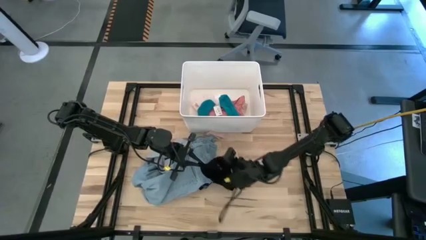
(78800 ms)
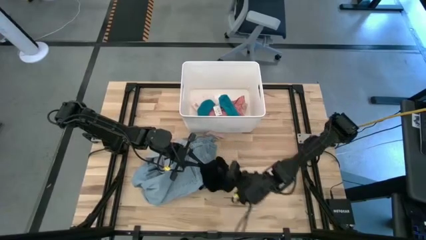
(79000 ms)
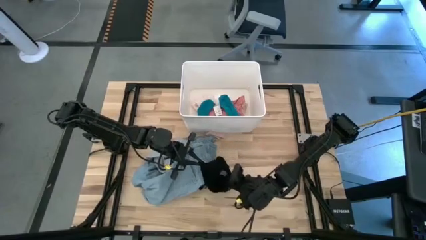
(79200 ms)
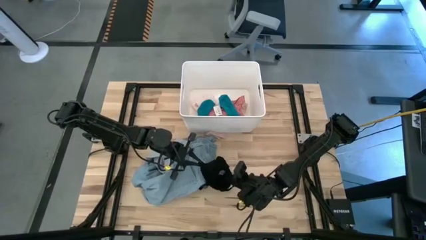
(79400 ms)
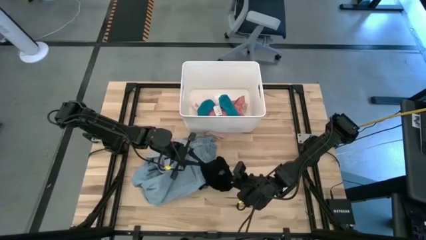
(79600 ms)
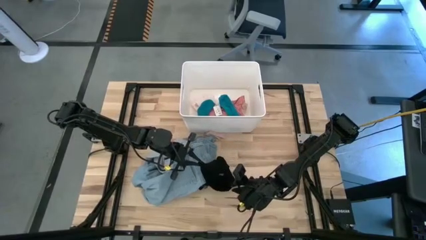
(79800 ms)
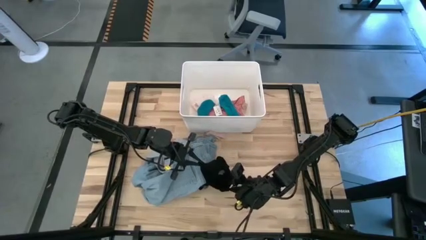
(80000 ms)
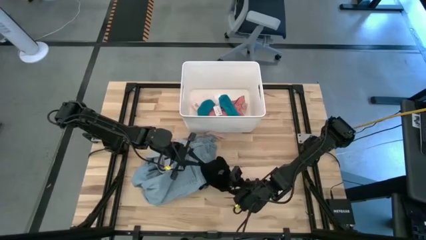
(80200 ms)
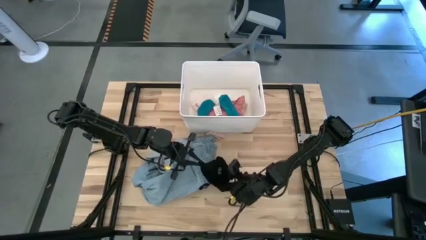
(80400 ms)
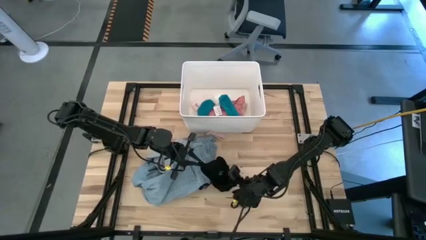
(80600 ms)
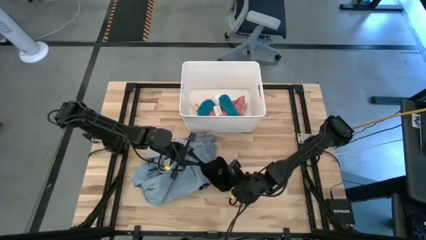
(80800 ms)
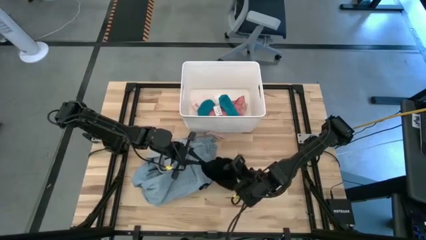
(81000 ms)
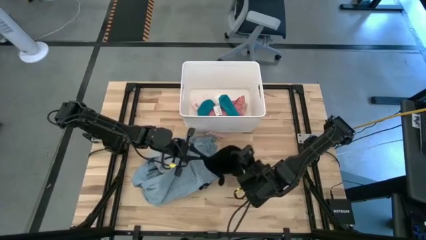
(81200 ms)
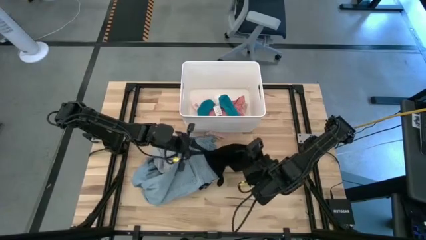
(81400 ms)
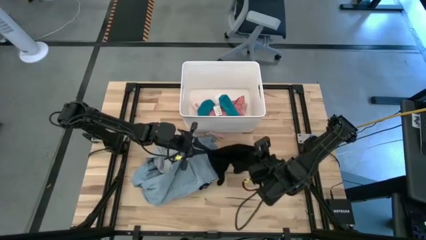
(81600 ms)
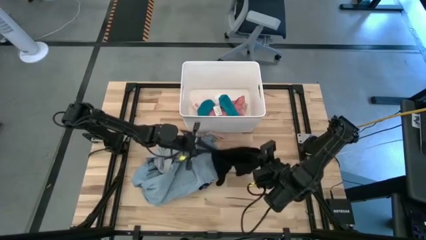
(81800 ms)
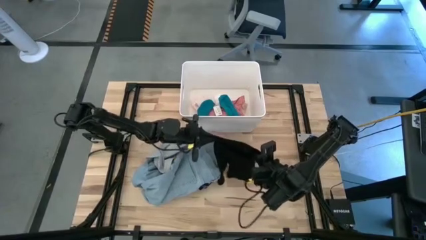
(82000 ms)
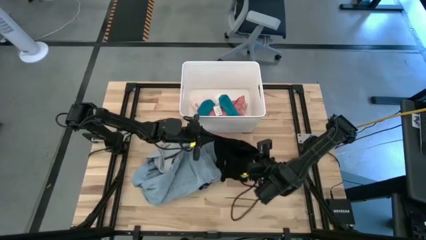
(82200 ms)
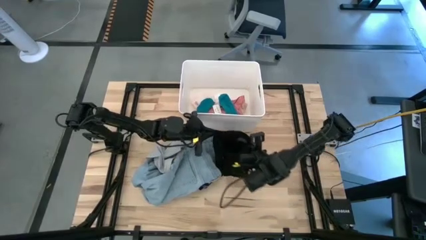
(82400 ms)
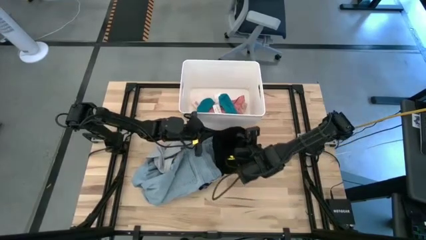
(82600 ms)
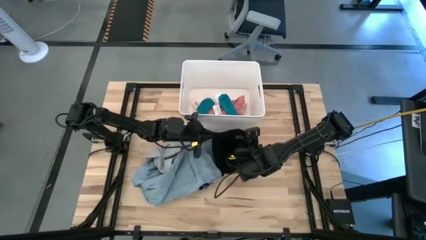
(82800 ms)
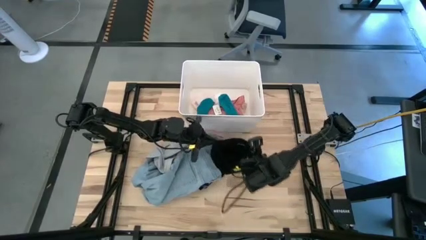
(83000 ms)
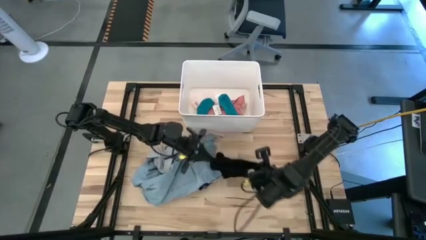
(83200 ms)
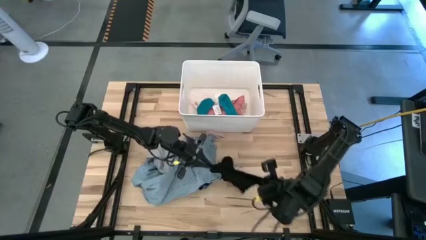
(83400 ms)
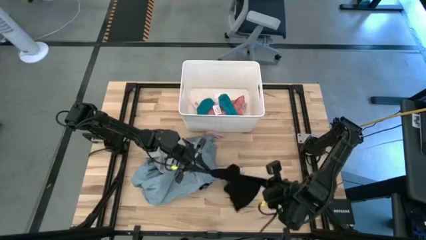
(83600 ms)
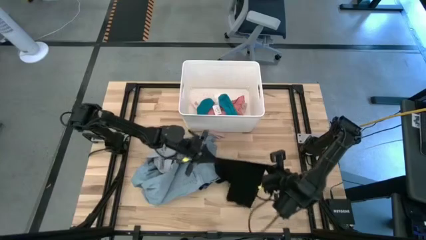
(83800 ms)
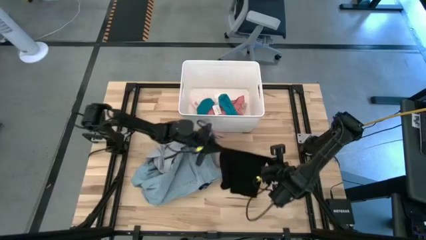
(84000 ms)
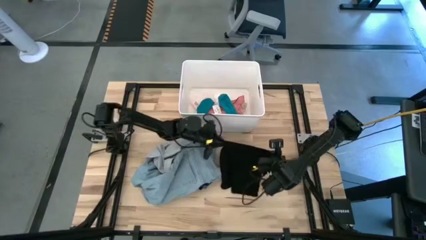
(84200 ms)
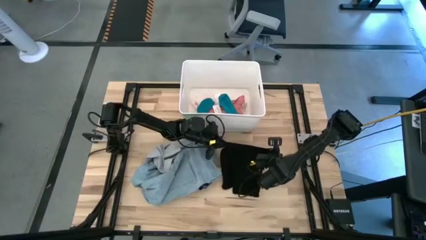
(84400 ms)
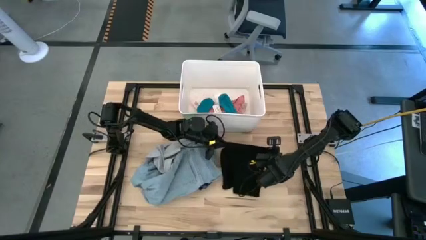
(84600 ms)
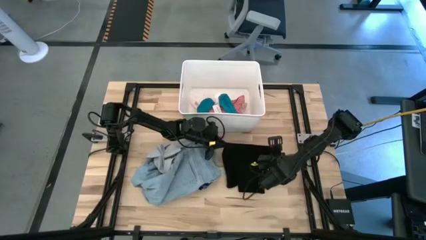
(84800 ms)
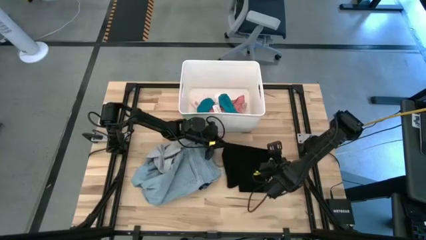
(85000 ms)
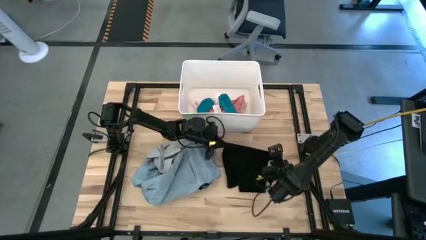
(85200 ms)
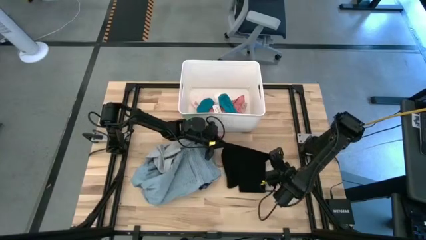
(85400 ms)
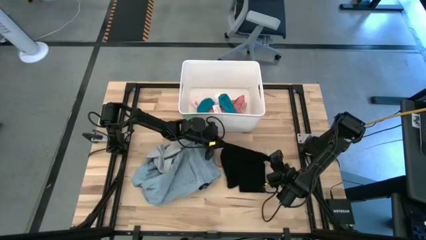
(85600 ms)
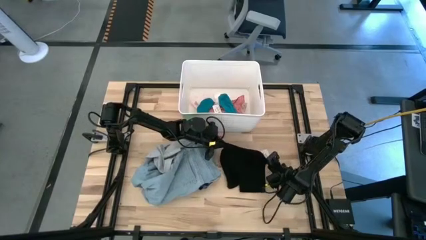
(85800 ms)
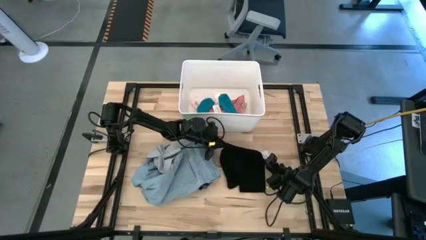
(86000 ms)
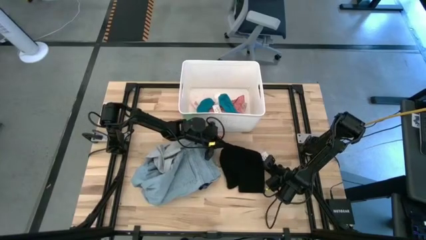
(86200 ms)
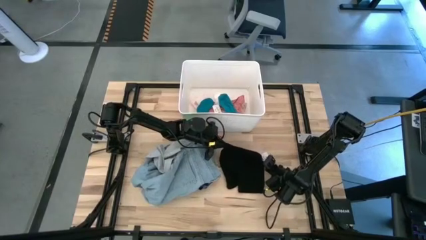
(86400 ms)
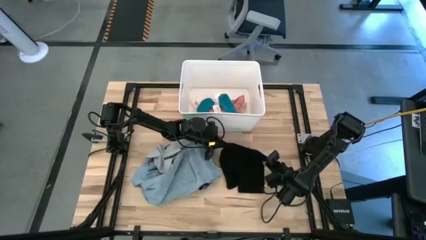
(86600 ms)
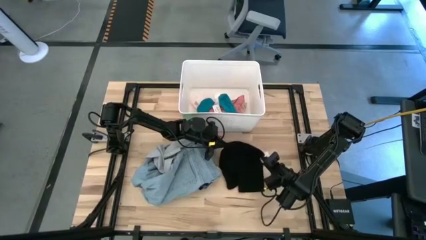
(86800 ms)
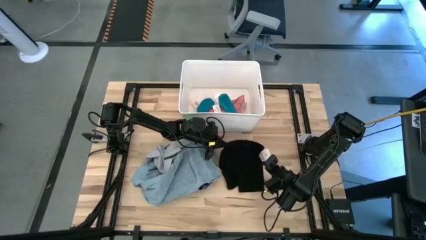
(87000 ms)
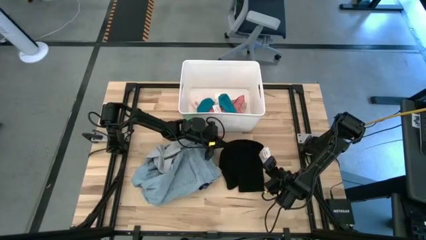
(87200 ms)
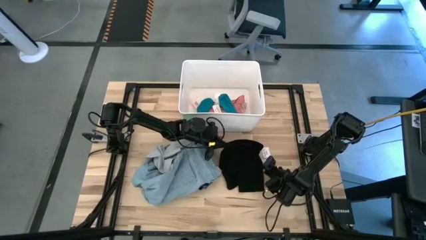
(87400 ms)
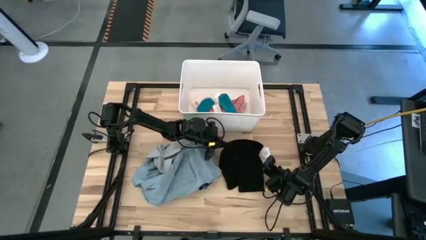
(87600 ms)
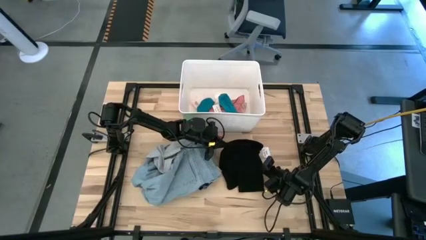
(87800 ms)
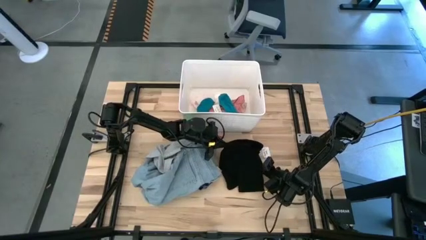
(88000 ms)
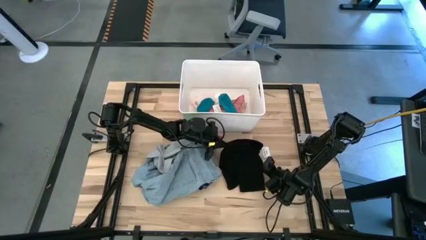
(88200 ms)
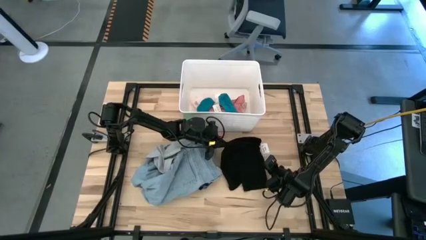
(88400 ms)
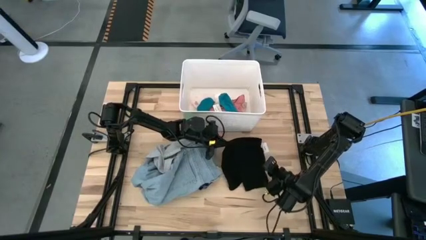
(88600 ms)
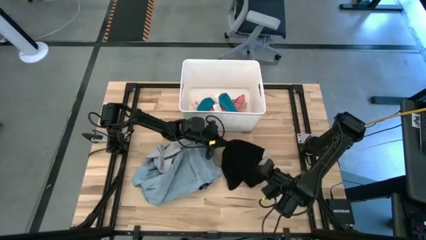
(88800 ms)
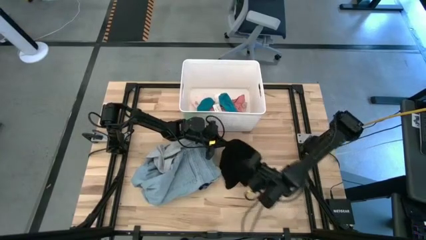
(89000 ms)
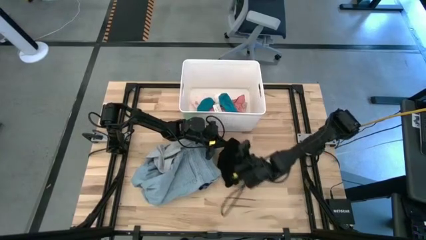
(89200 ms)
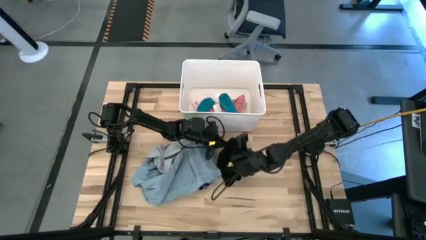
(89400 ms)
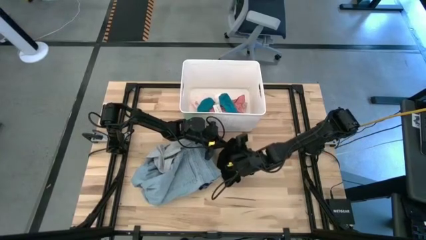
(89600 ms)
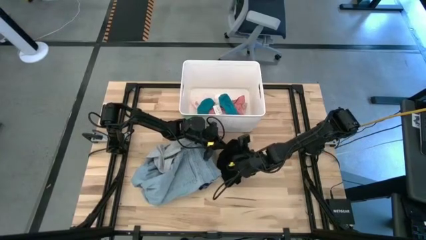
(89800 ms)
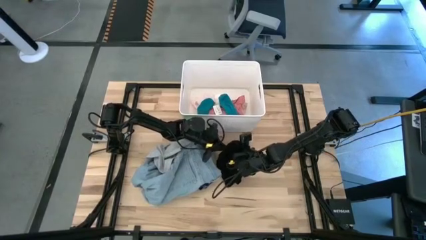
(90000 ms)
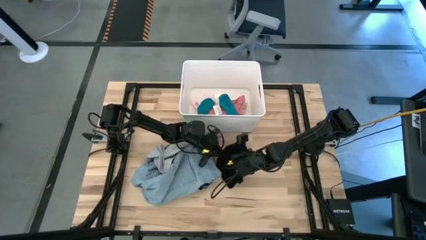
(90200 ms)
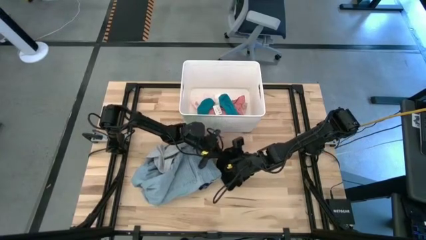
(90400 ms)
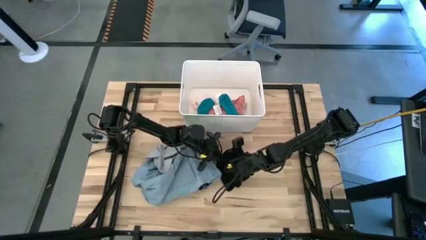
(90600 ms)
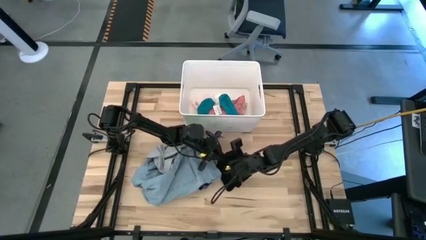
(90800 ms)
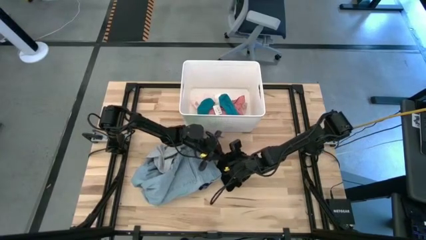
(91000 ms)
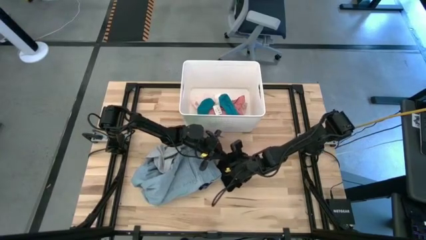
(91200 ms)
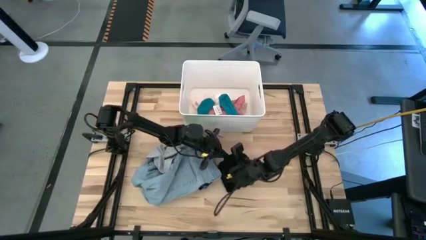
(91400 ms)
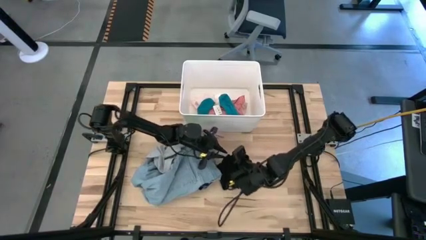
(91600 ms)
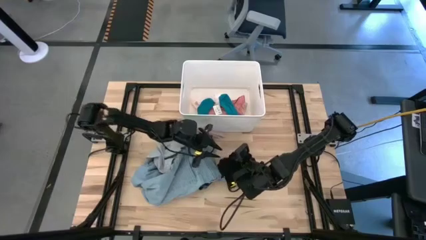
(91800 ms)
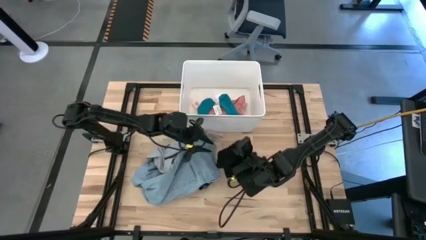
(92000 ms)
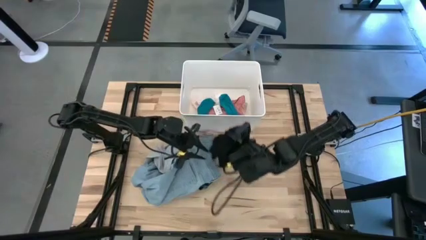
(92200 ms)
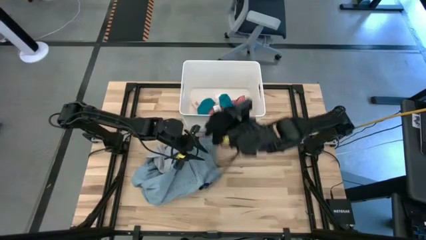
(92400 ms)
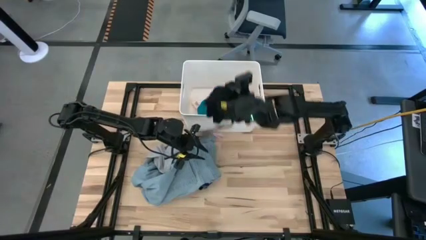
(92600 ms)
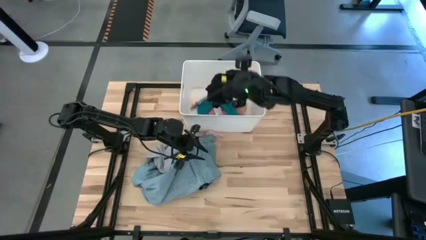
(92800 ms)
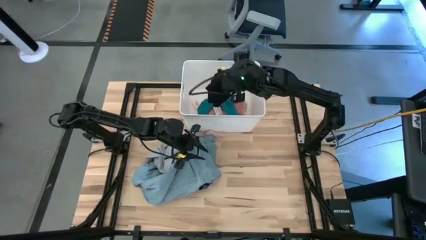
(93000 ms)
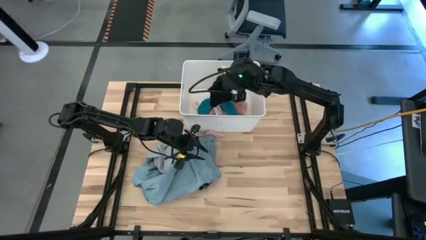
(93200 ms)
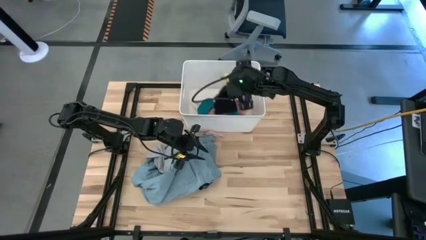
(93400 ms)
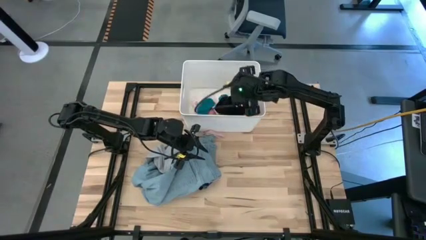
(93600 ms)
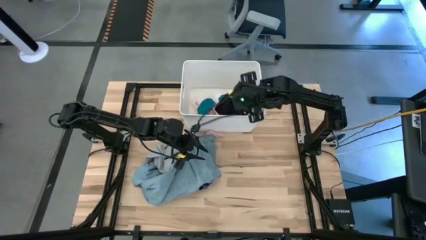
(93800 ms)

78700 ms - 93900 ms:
Task: Sort clothes
Put the black shorts into the white laundry bin

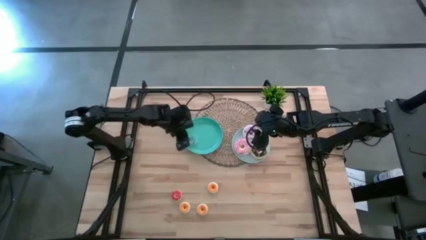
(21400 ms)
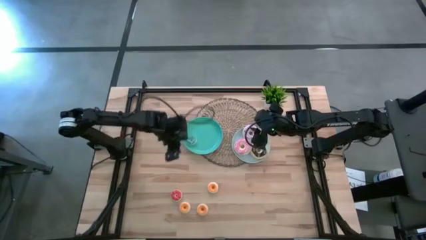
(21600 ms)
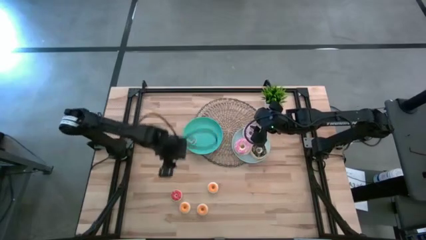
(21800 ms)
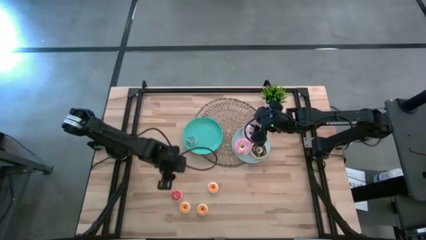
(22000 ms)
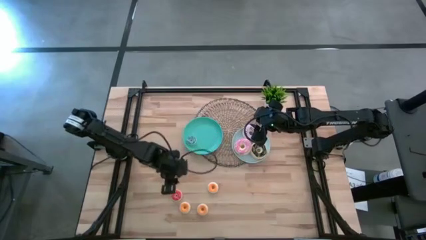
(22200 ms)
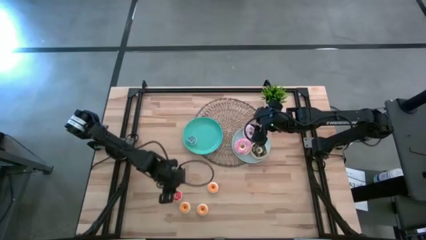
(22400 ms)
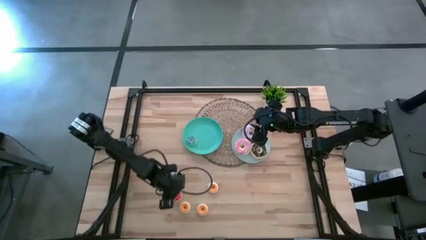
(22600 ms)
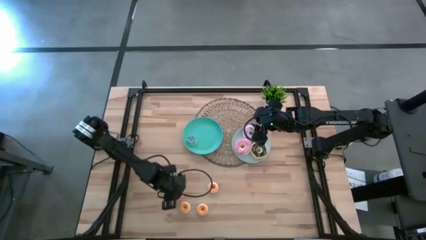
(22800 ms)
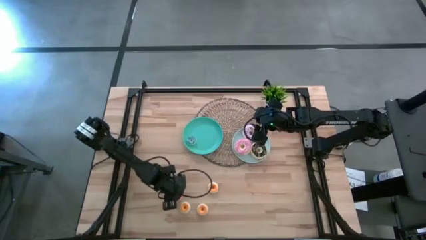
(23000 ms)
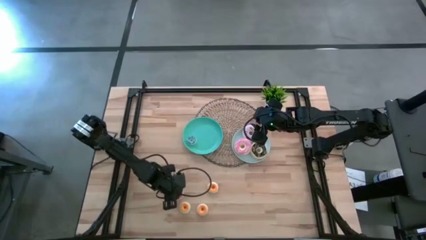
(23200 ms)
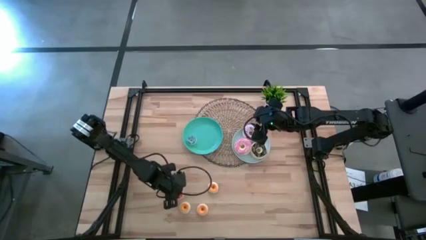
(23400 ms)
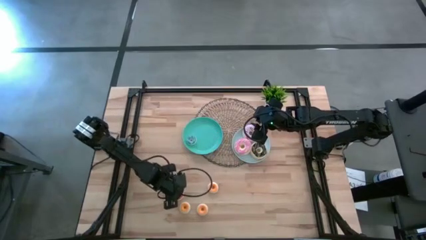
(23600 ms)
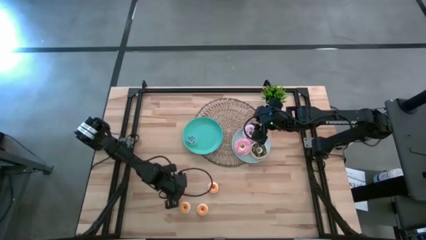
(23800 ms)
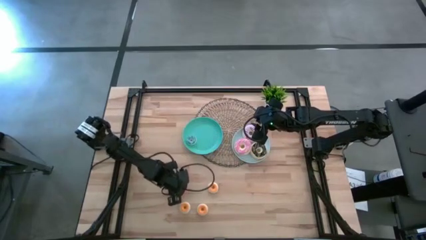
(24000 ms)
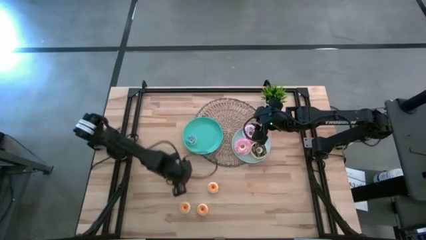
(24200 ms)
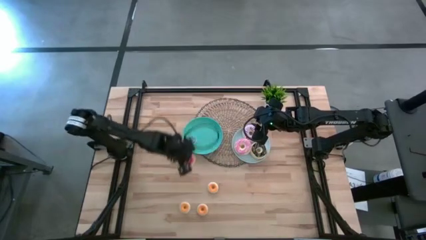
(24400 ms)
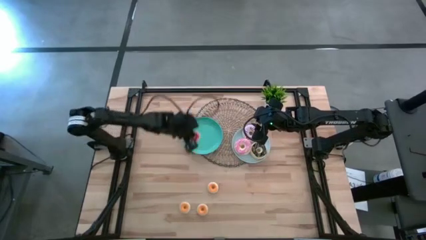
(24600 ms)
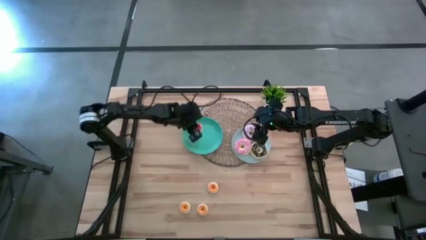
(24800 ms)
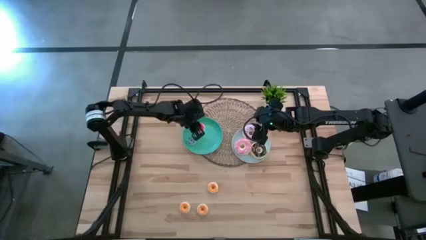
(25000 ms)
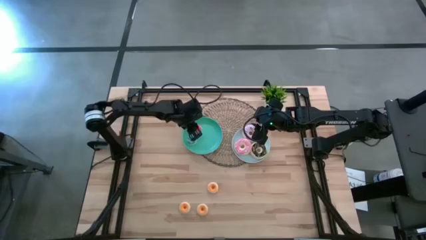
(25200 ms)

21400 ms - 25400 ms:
Task: Pick & Place donuts
Put the small orange donut on the green plate
